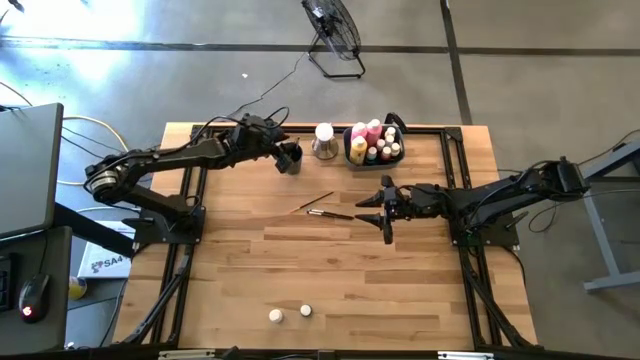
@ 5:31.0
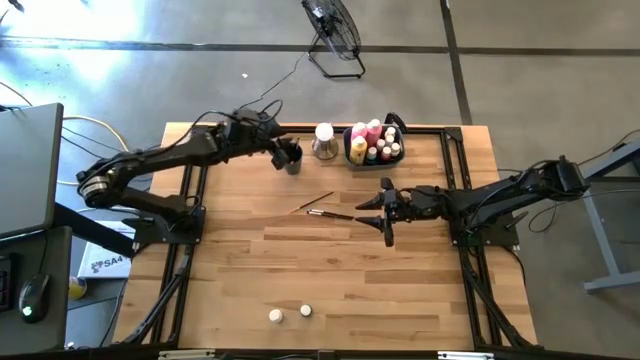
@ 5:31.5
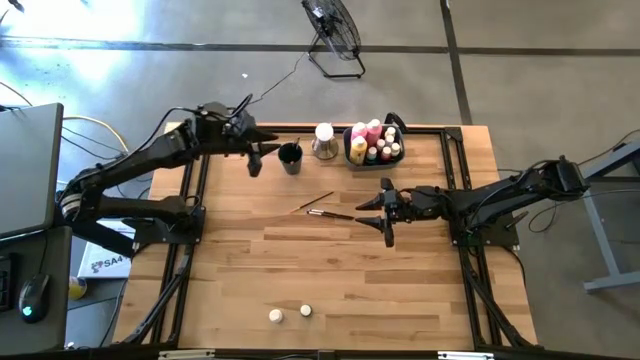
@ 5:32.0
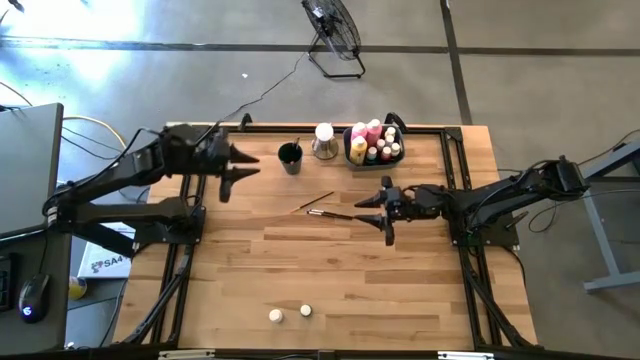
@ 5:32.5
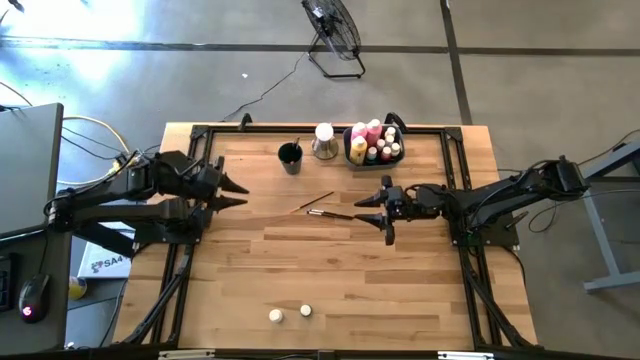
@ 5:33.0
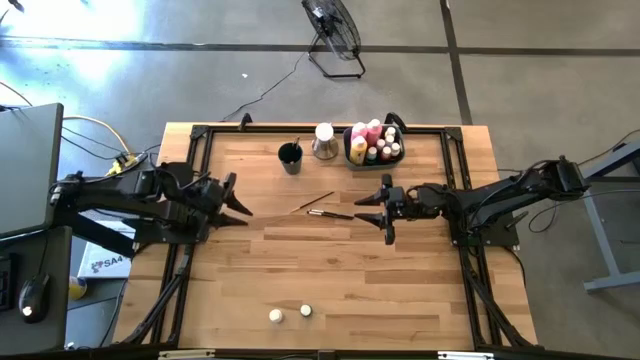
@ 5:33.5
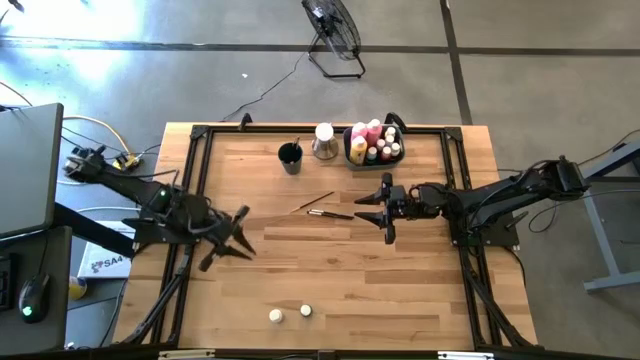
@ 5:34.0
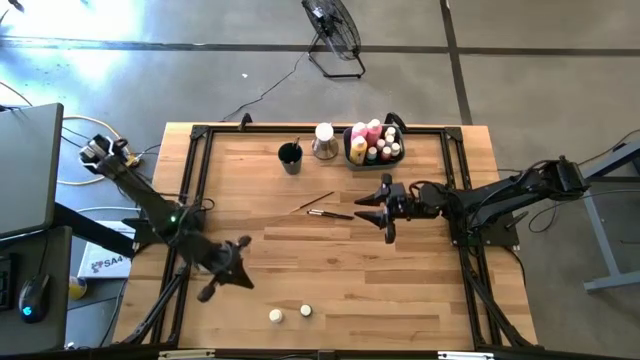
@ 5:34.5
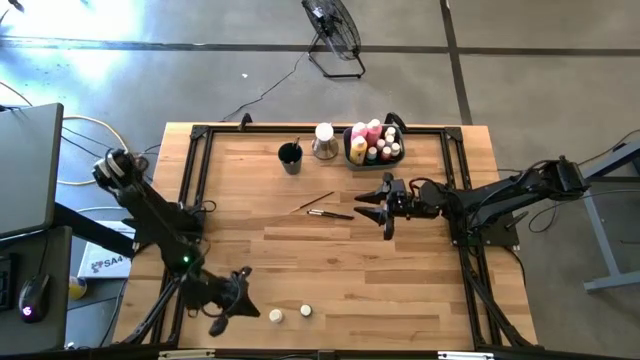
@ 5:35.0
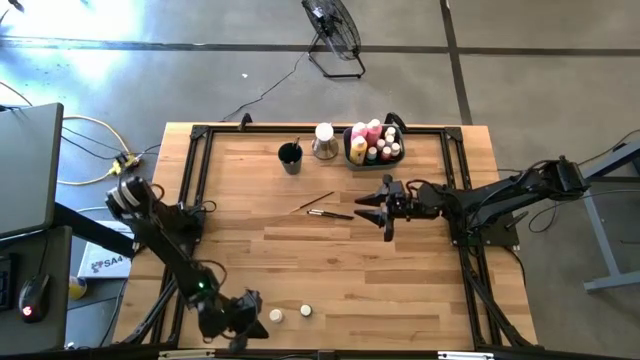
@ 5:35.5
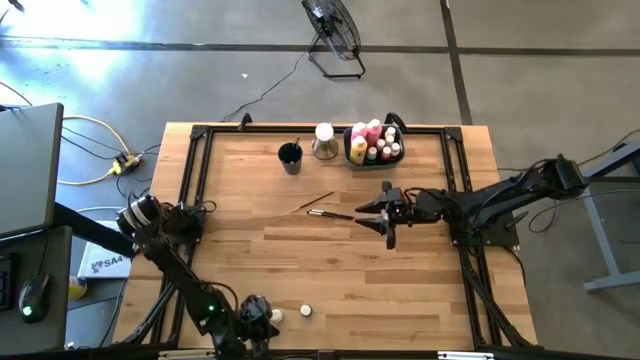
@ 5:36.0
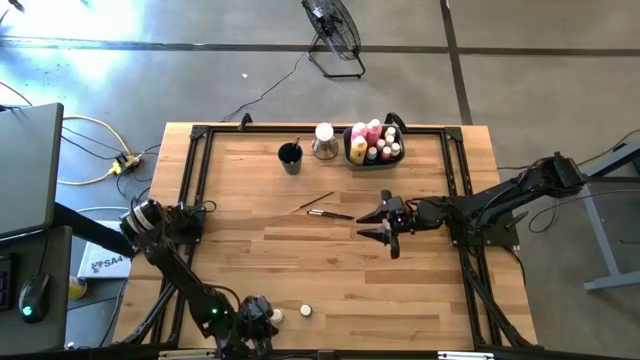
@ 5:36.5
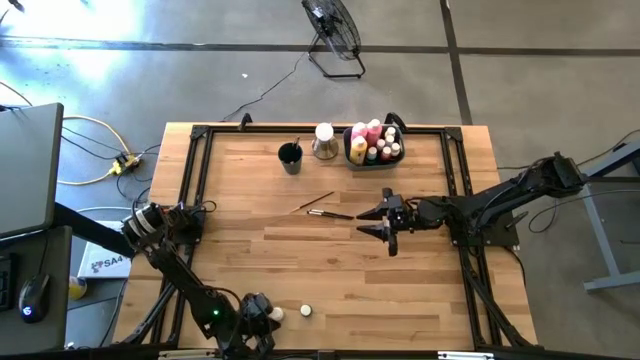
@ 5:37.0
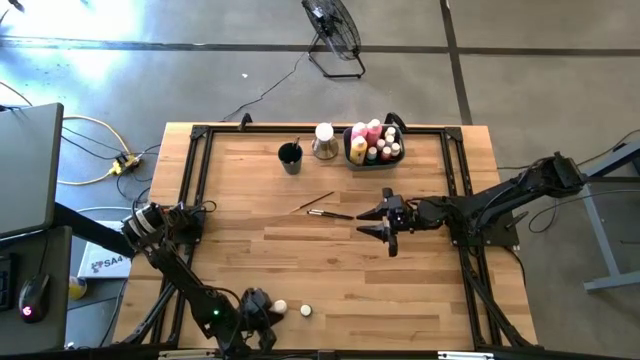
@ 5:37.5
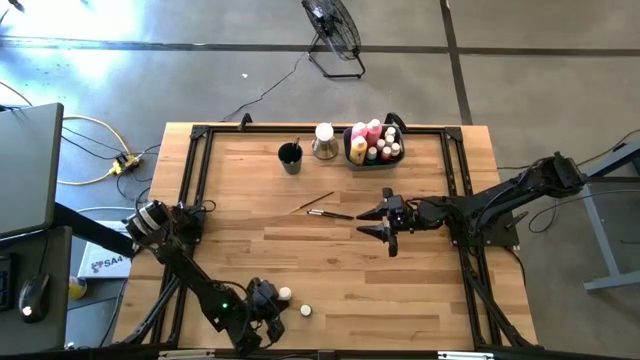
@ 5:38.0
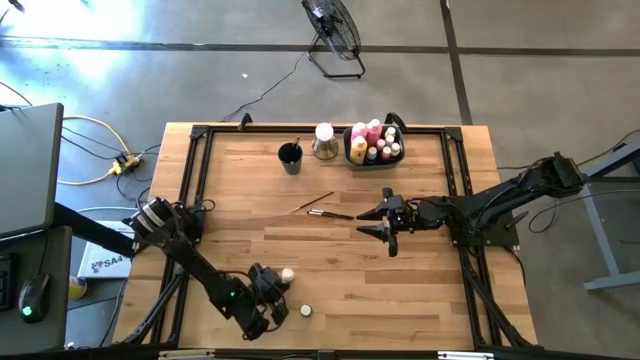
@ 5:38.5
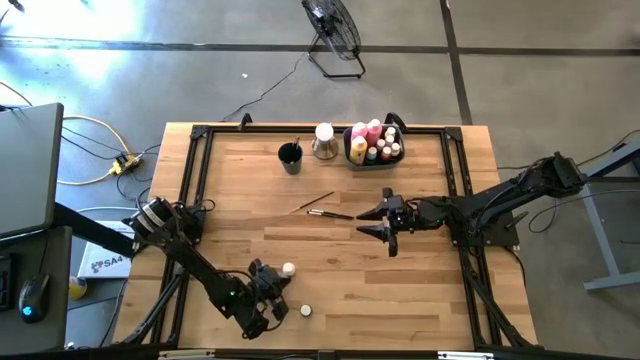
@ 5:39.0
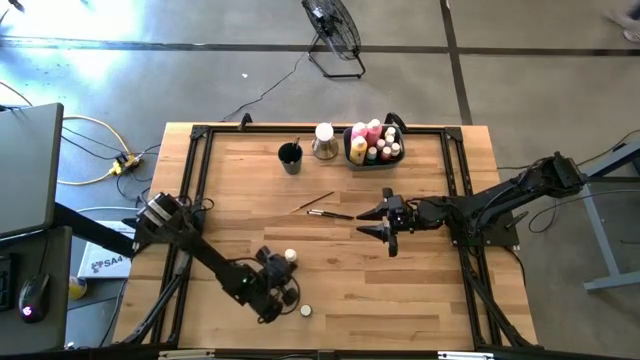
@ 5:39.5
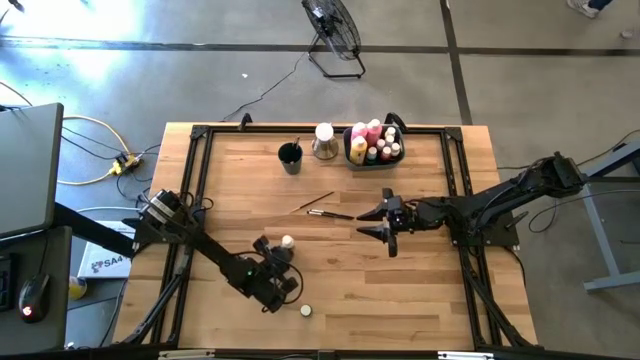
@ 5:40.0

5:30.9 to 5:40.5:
Task: Pick & Place Paint Supplies
Move the small white paint bottle to the center of the table

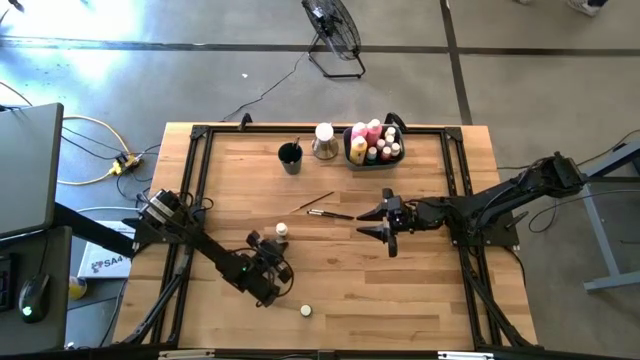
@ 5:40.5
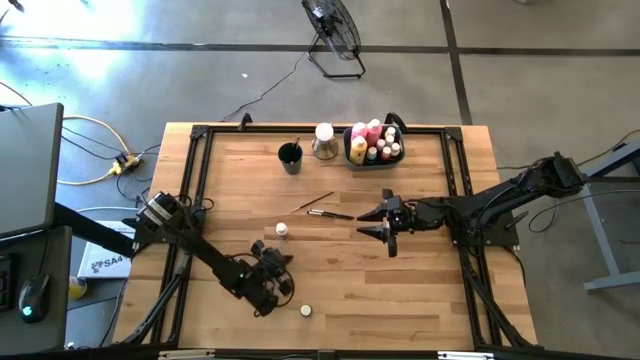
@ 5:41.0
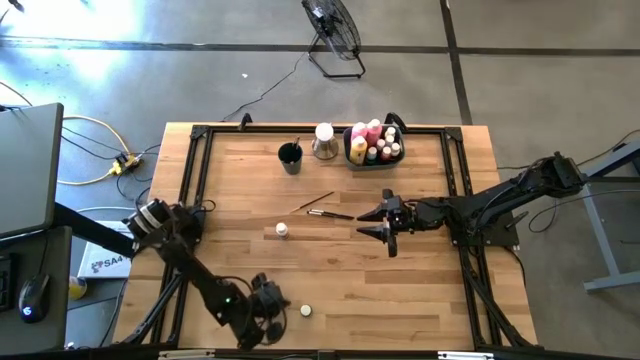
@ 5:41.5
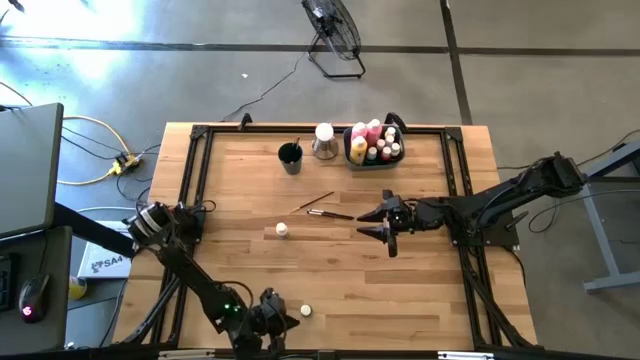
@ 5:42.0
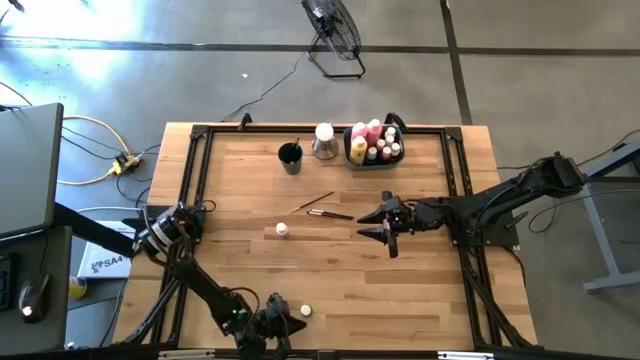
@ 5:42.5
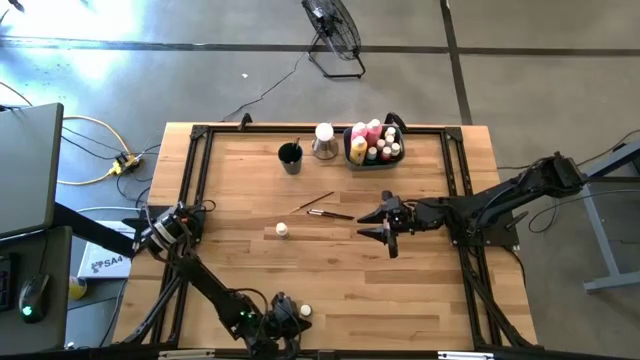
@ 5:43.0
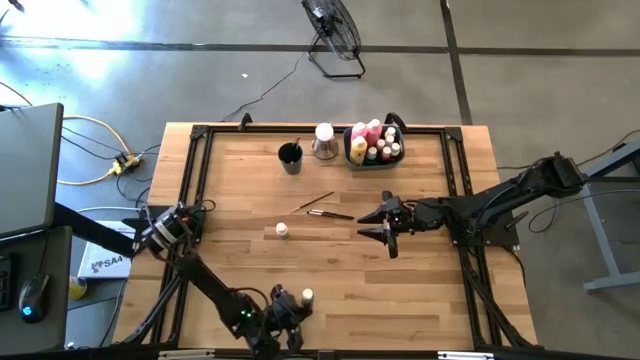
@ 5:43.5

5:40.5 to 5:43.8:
Move the small green paint bottle to the center of the table
